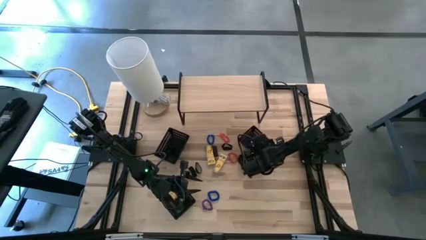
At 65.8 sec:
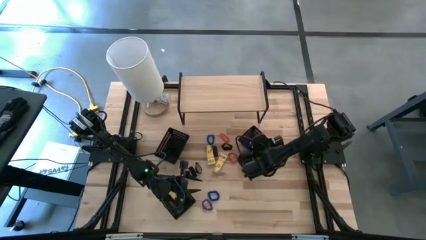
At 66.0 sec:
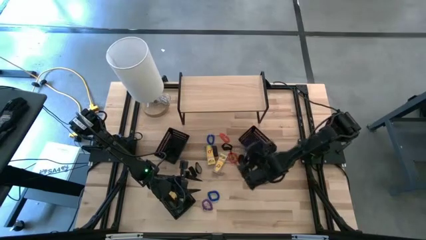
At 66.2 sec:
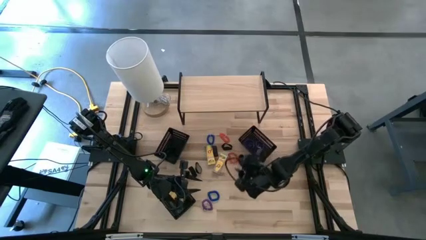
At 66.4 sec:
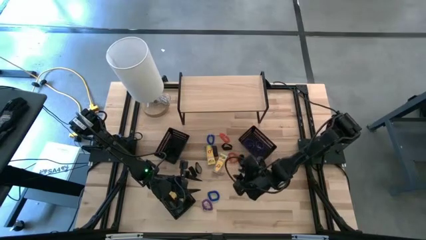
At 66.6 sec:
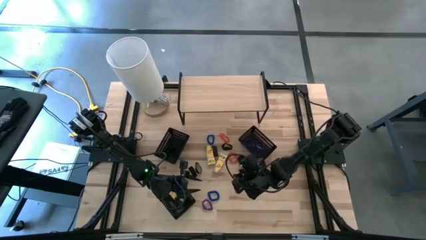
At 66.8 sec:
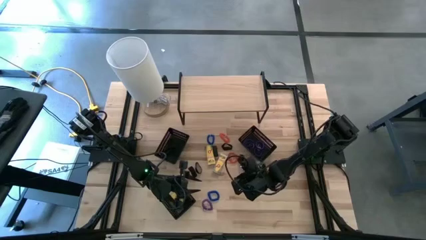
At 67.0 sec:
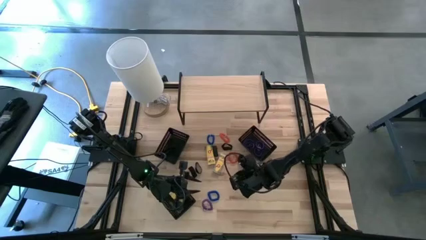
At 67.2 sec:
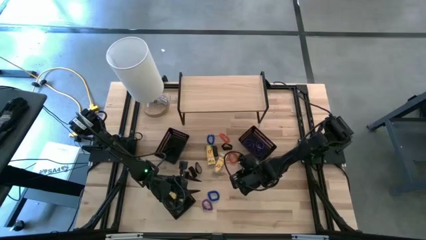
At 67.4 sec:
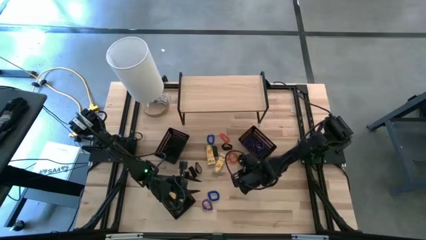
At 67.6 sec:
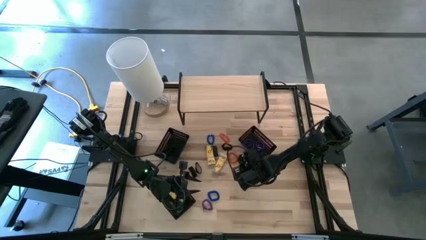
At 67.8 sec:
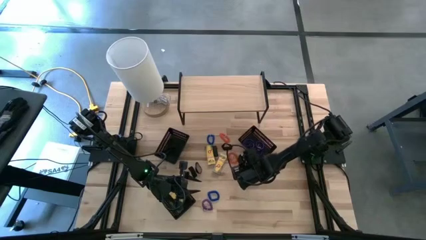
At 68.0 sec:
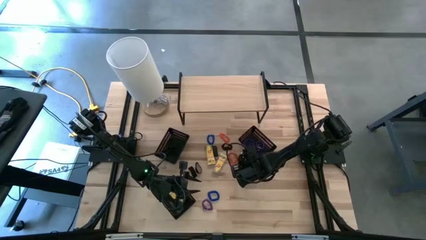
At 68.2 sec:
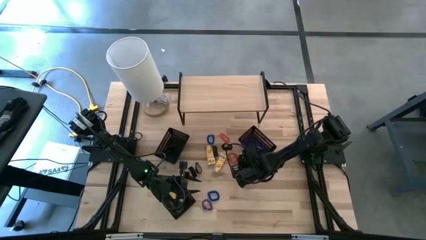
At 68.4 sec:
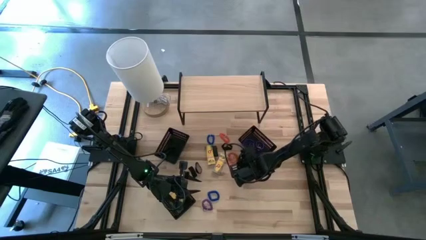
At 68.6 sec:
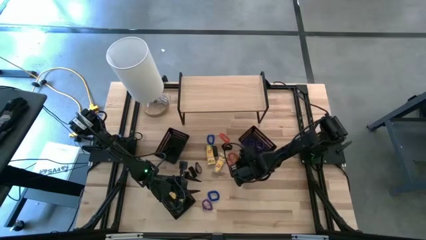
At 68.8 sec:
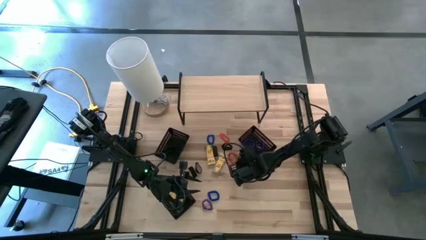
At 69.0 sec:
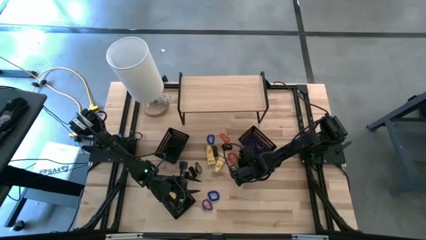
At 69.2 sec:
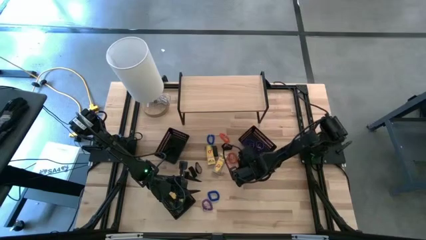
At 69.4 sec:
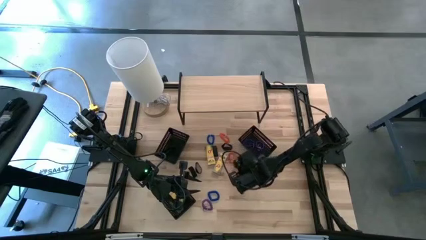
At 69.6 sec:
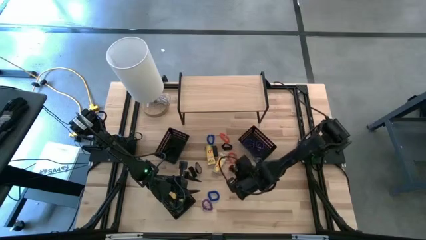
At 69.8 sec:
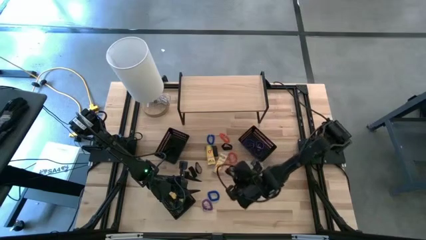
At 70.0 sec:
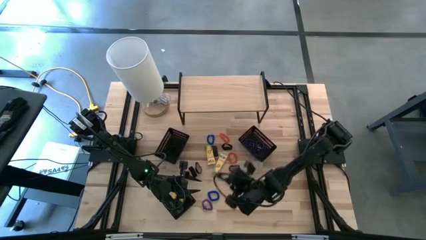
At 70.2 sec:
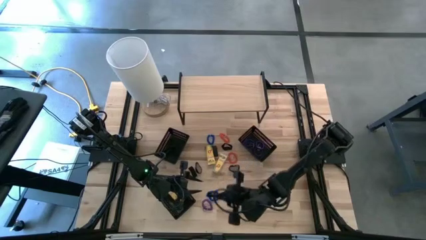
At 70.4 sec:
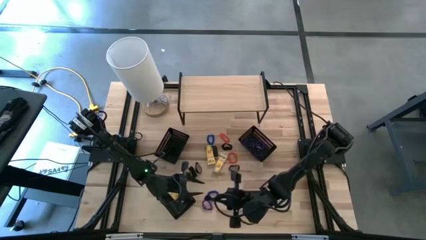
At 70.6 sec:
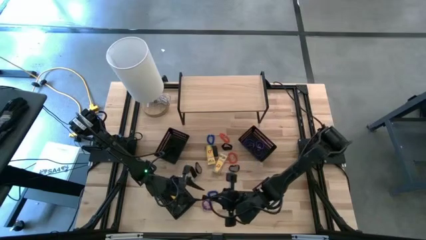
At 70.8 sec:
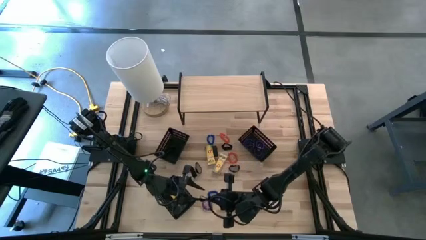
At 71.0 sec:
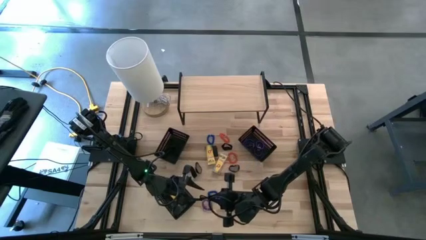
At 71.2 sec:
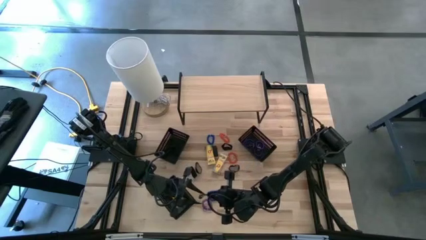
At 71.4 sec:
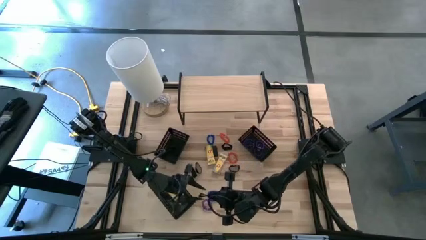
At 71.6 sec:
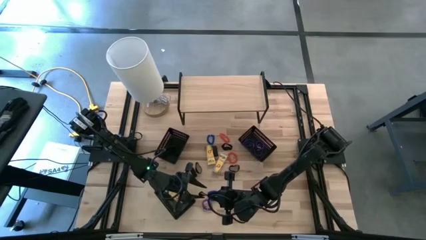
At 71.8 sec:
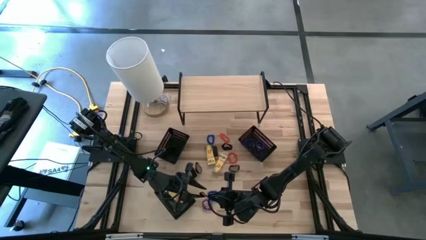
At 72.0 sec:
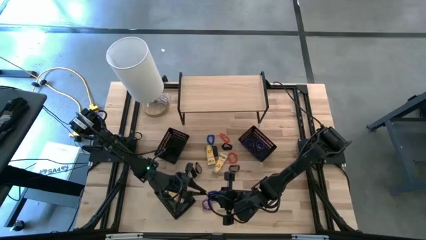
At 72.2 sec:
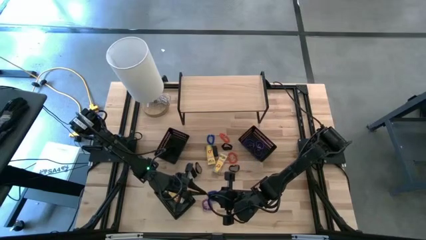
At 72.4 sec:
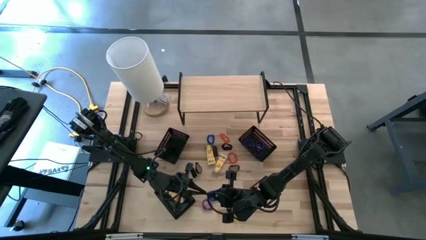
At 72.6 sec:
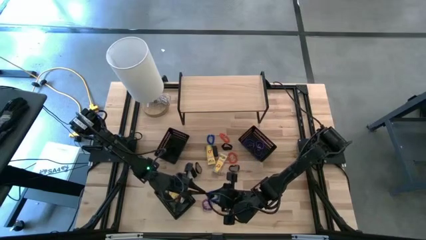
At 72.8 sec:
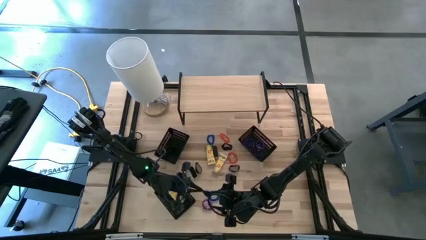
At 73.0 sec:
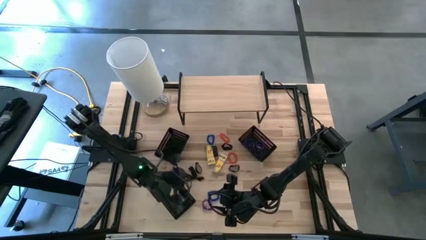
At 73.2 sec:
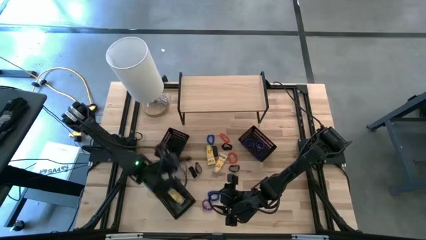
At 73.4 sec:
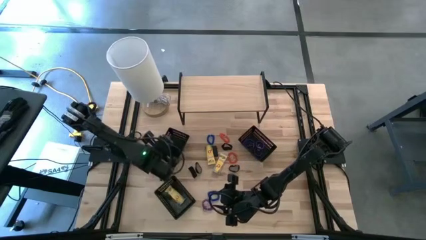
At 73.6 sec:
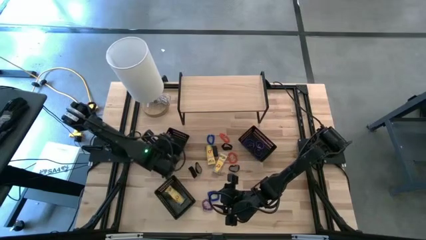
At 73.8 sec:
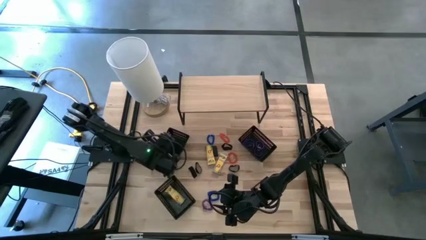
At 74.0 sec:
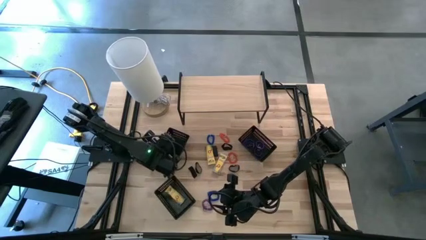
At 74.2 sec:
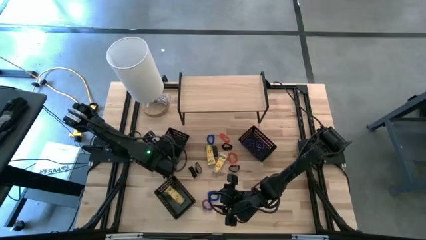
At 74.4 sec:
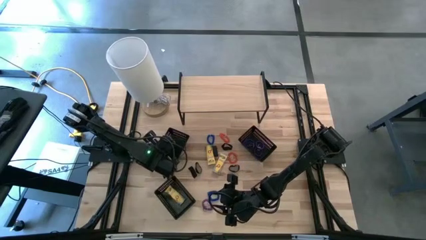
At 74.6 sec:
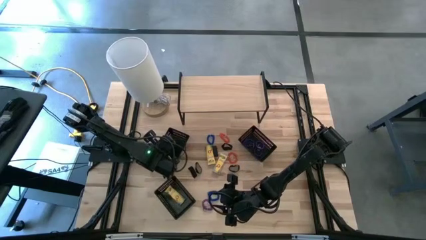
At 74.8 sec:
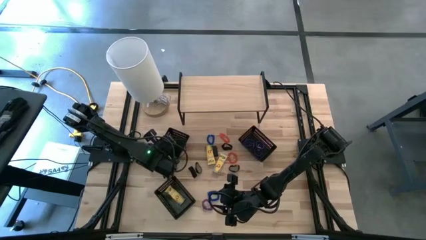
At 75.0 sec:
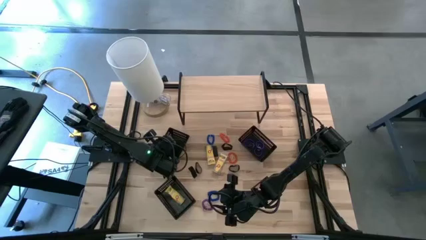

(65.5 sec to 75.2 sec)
Task: Pick & Place Office Desk Supplies
Put the black rubber band into the top left black bin

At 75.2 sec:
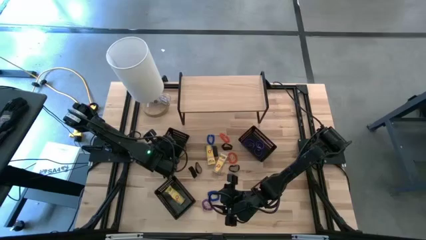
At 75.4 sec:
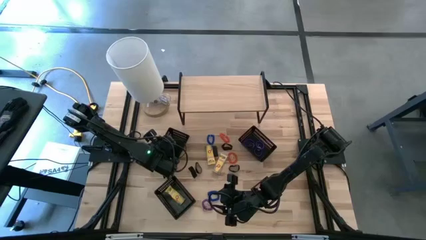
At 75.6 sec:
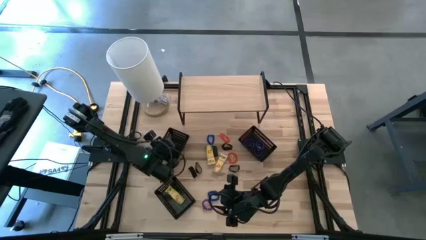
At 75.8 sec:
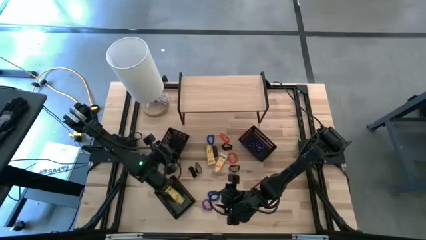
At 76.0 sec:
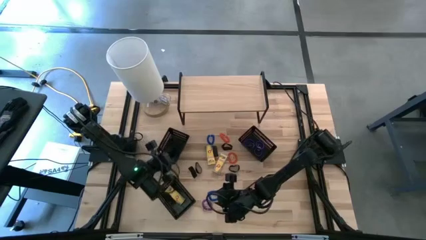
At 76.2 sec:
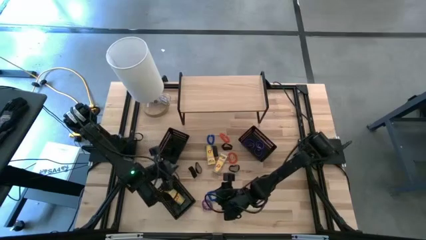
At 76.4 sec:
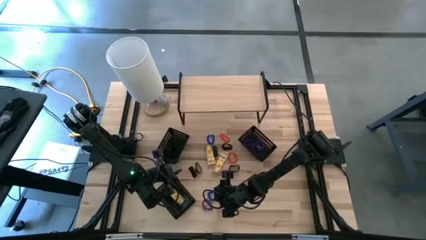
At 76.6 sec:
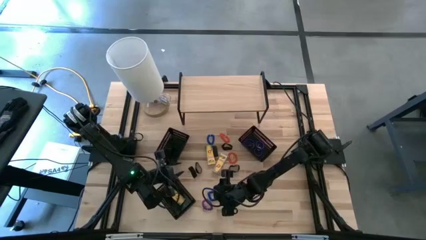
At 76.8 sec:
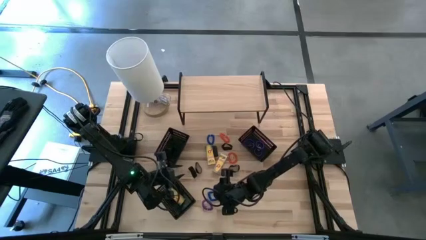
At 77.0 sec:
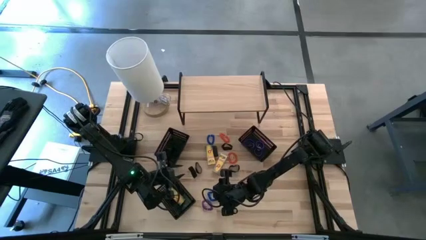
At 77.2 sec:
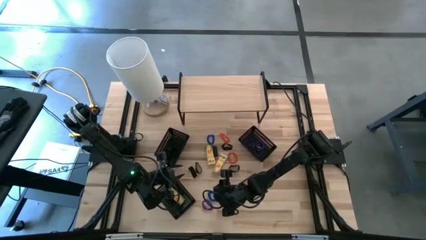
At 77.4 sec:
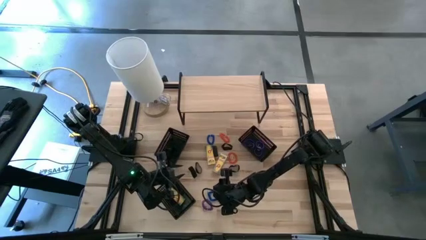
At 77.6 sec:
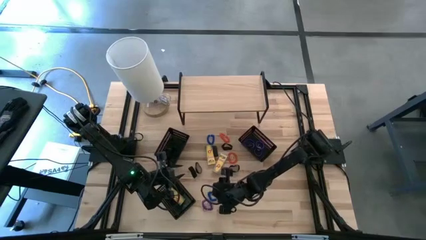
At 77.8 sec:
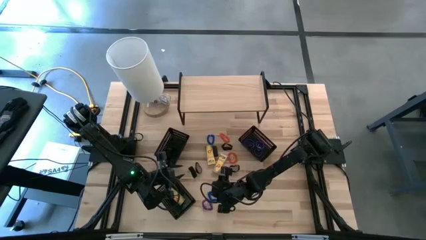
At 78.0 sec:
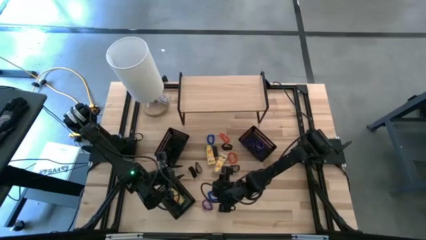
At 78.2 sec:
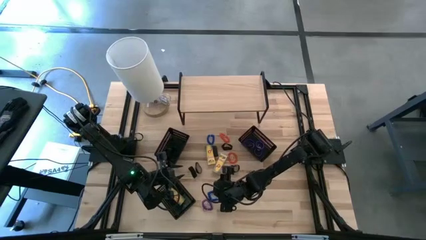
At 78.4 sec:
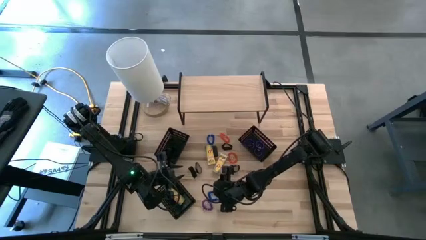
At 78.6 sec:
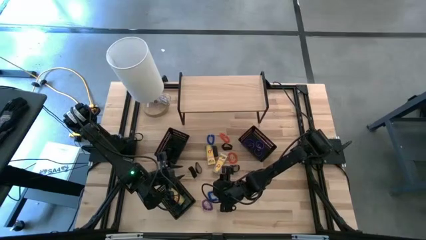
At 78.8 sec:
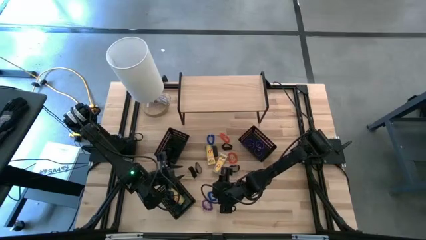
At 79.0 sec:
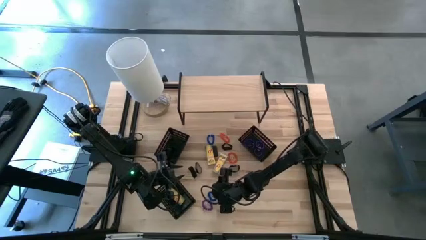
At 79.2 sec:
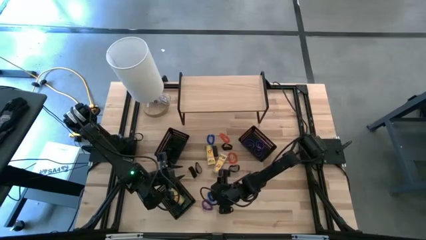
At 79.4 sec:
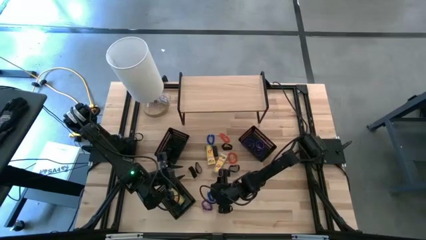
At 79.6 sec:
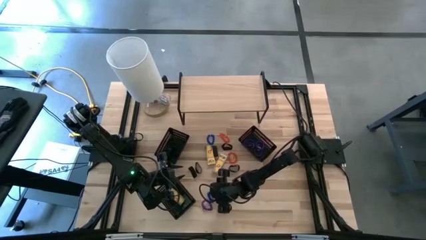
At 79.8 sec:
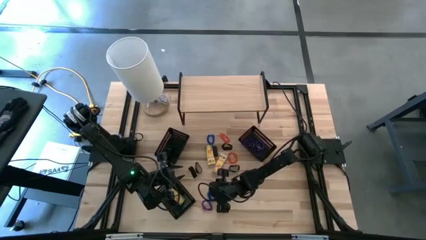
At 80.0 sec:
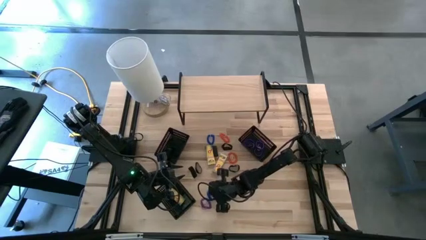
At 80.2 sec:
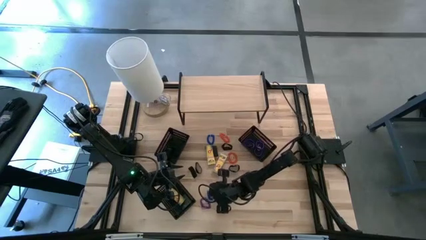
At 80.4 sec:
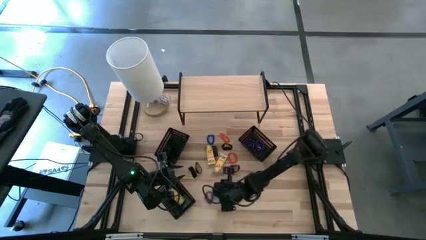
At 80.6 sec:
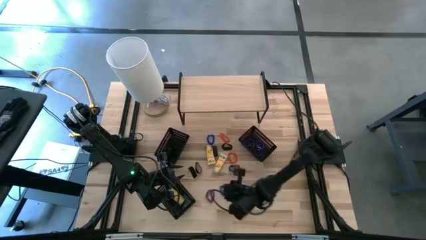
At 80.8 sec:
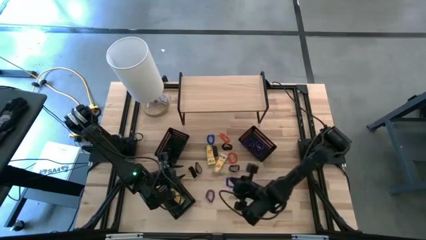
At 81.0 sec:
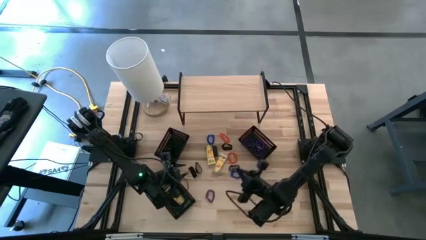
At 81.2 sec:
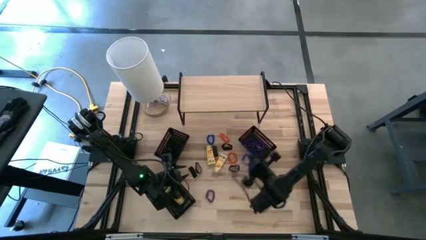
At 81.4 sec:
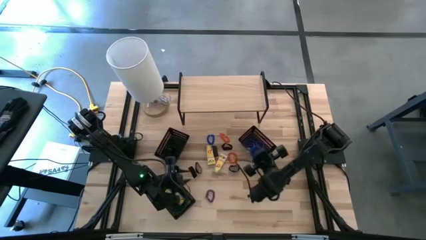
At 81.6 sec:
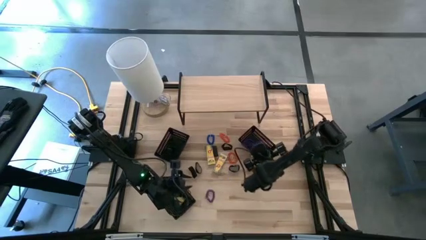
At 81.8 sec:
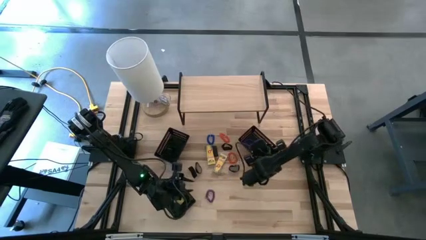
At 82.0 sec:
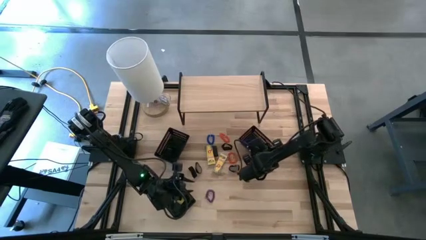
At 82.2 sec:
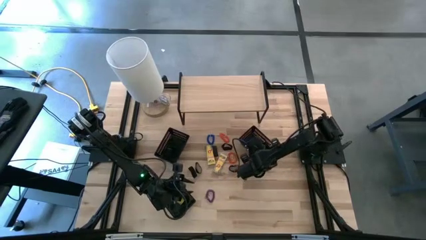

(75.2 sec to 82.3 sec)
Put the bottom blue spring keychain into the top right black bin
